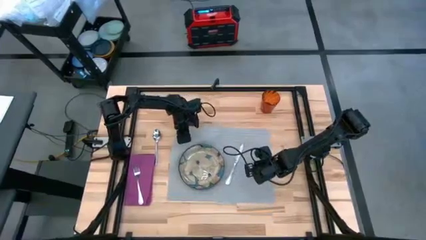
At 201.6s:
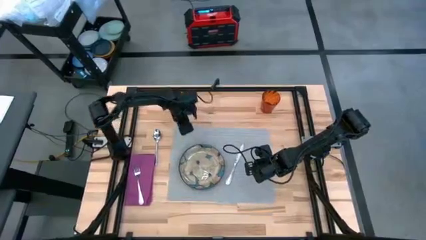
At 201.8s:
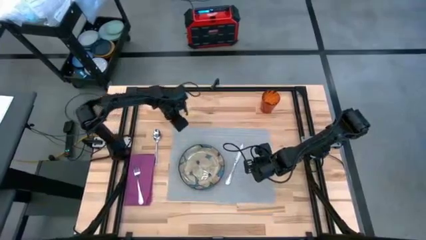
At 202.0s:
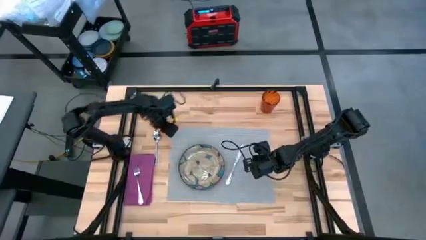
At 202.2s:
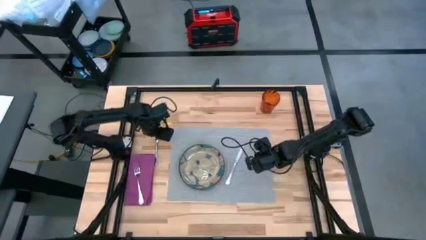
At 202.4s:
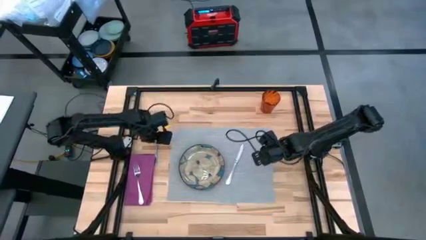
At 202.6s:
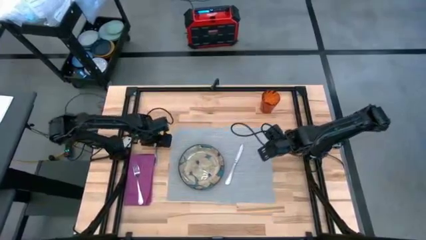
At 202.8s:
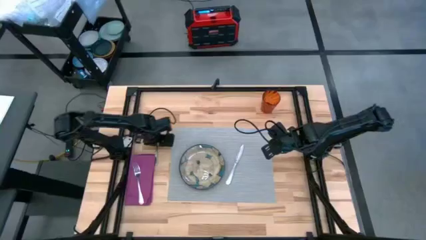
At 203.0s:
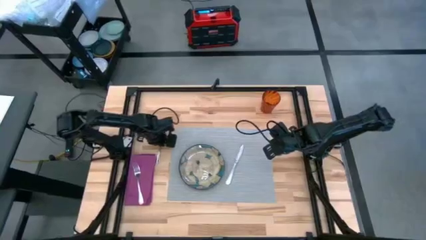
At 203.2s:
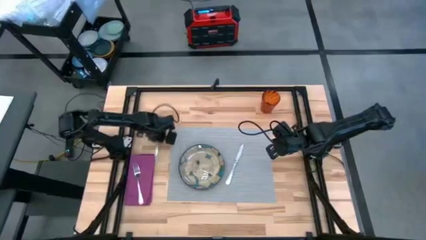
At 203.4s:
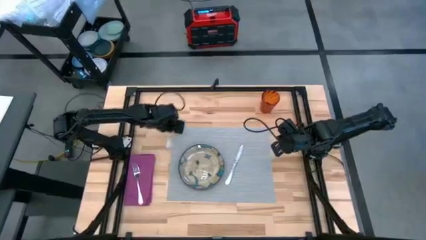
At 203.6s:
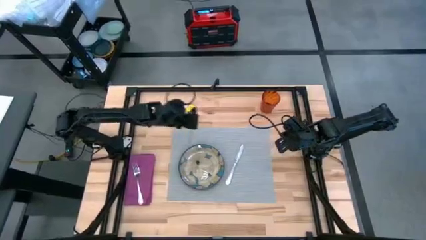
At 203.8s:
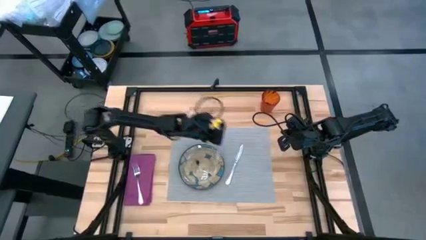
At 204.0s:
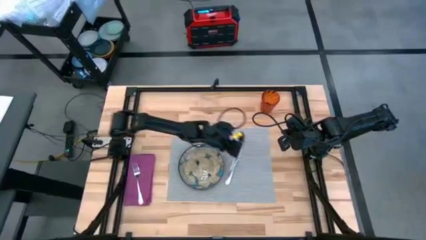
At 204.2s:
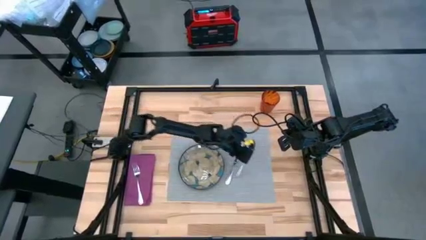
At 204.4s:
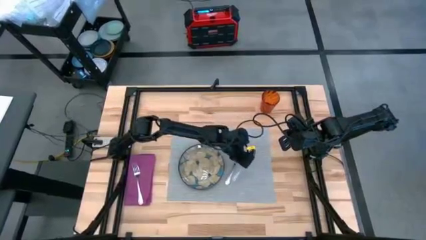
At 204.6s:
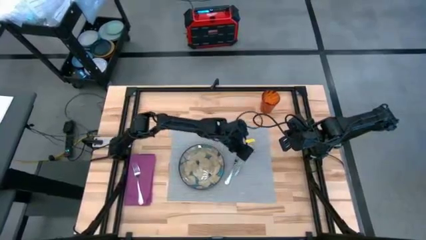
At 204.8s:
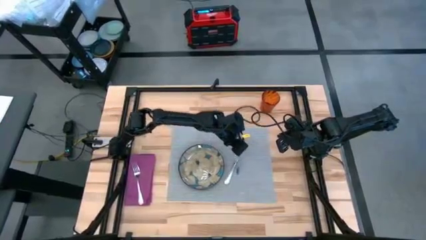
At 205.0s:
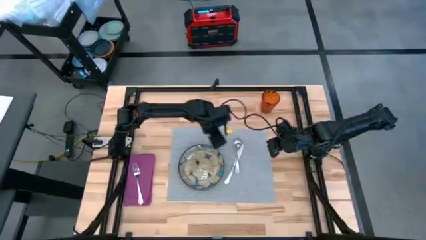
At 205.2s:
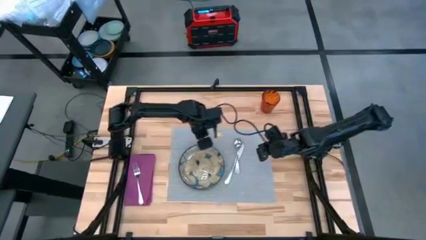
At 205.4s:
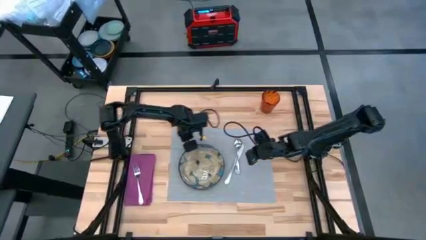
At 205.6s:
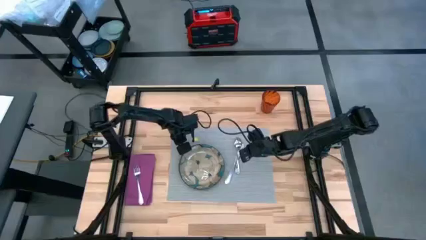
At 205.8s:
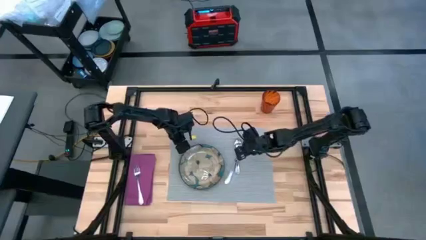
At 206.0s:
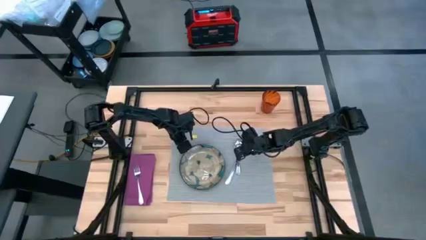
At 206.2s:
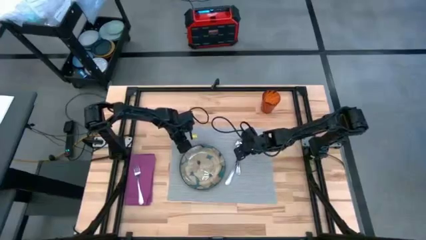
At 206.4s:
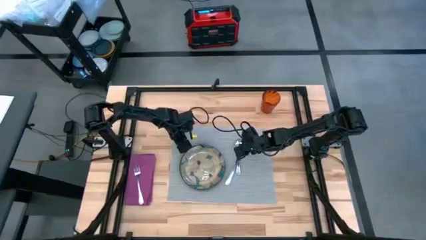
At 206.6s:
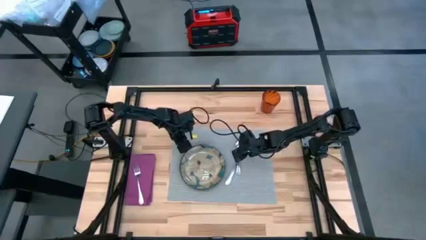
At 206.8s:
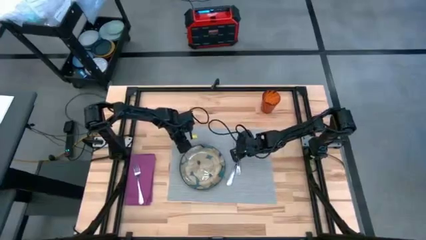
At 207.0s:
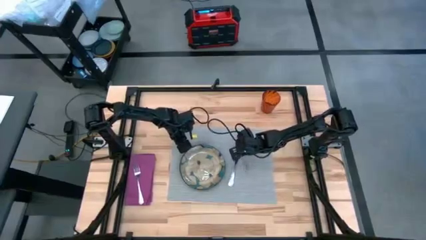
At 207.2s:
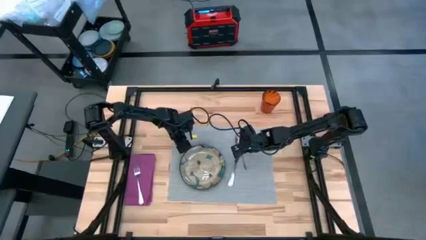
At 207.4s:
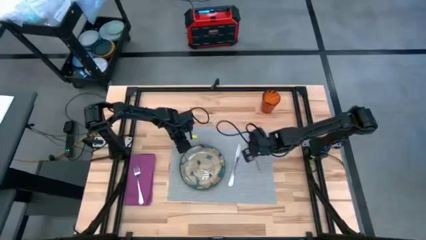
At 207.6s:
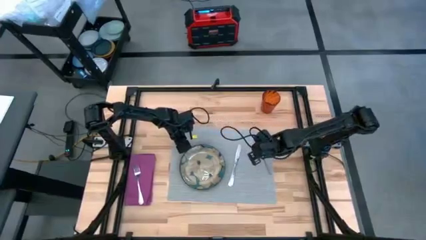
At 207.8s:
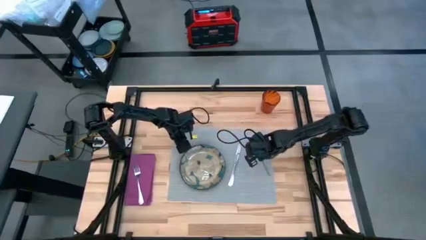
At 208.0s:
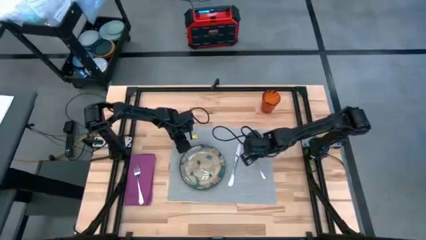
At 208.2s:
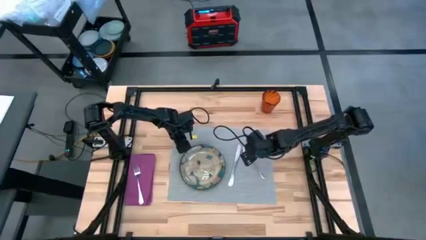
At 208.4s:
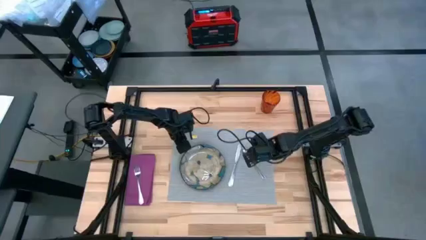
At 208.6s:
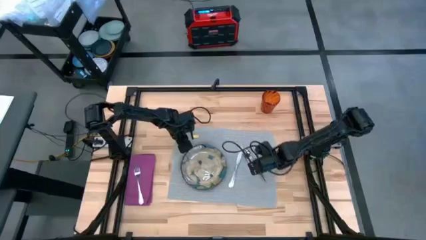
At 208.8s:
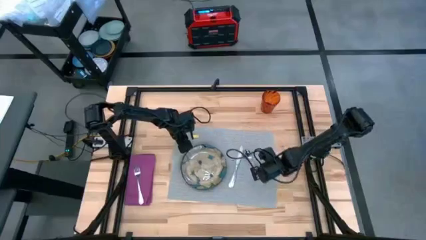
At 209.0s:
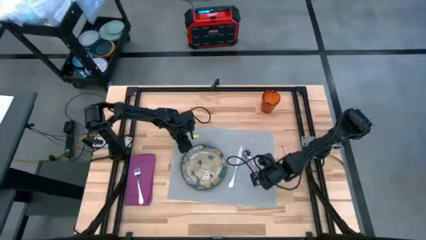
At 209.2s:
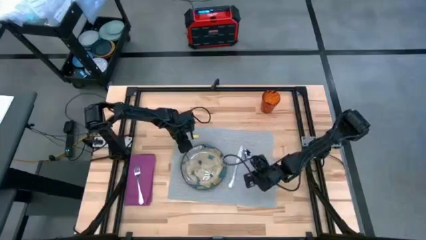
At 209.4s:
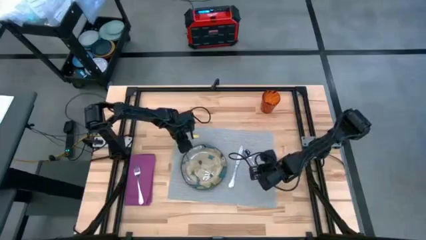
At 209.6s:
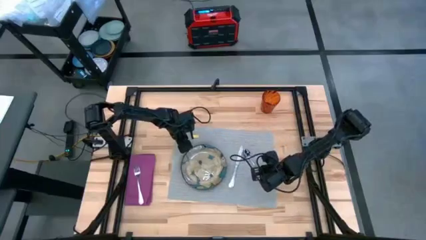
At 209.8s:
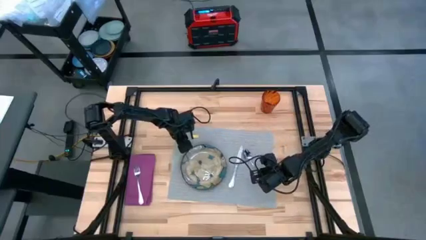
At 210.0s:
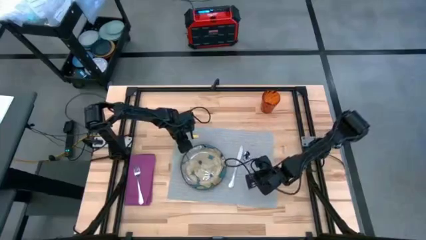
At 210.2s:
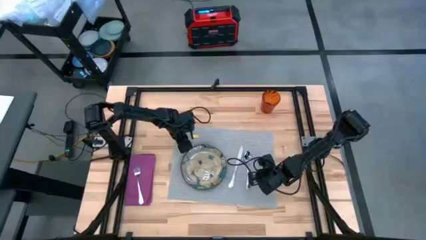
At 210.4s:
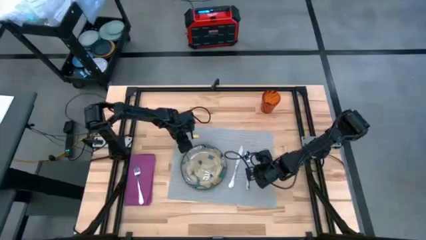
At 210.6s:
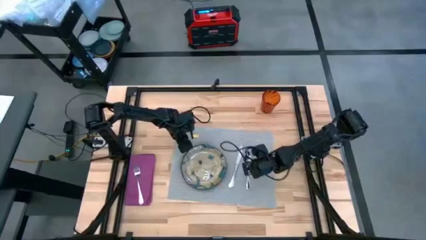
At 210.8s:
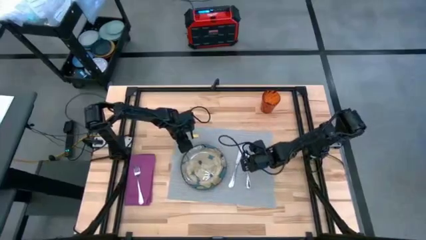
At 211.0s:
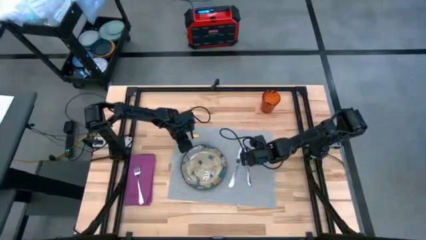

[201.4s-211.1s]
Task: Set table place
Put the silver spoon beside the silver knife on the gray placemat

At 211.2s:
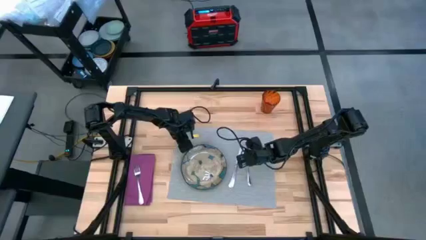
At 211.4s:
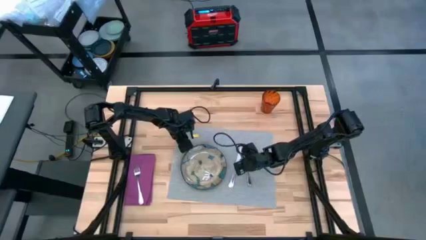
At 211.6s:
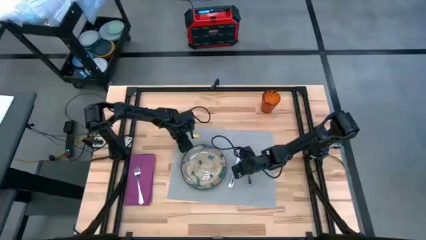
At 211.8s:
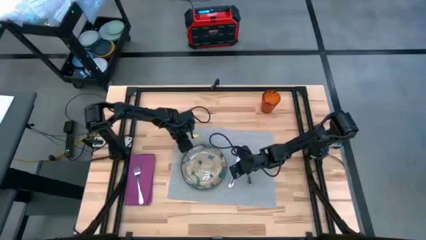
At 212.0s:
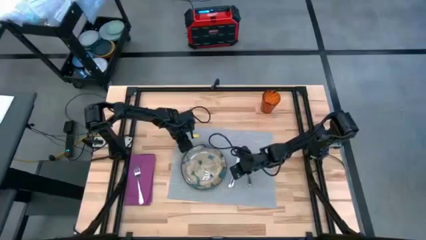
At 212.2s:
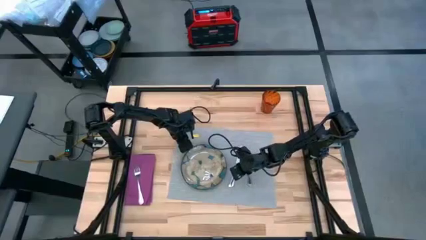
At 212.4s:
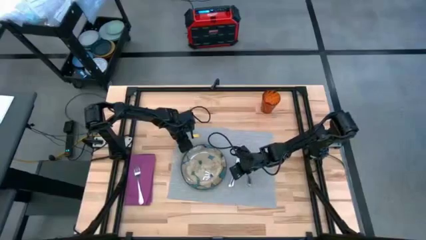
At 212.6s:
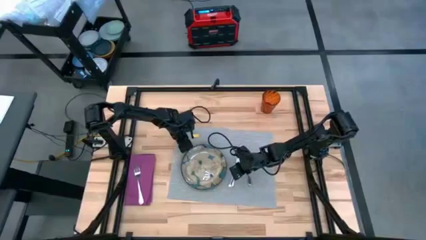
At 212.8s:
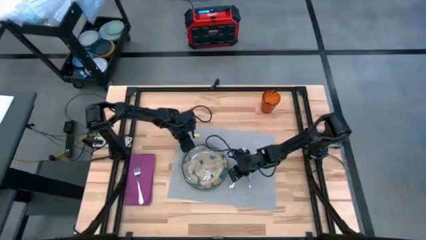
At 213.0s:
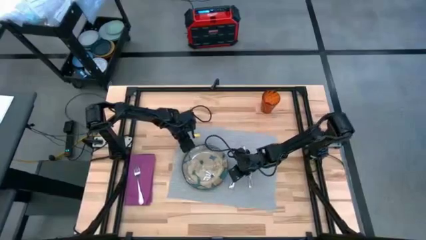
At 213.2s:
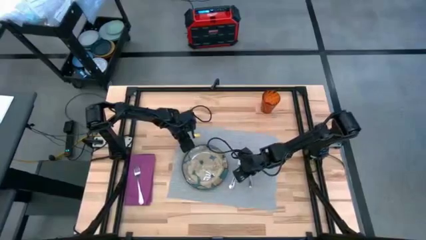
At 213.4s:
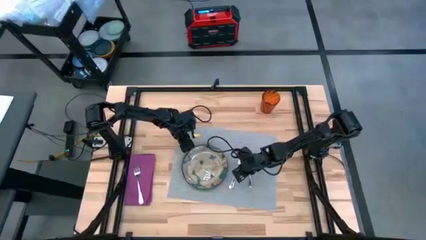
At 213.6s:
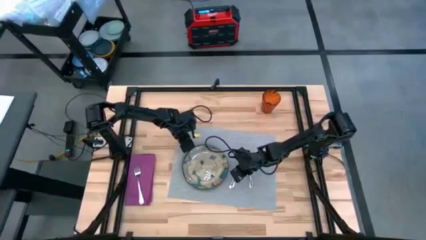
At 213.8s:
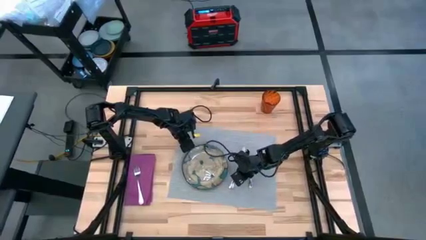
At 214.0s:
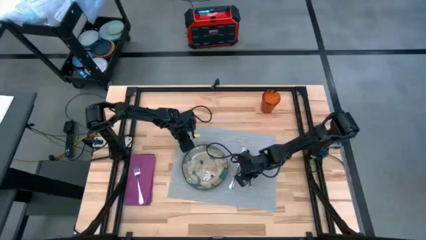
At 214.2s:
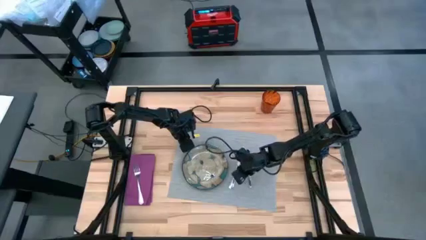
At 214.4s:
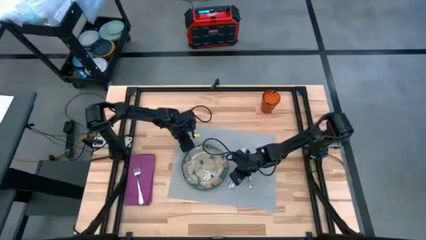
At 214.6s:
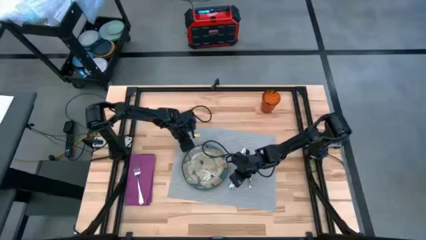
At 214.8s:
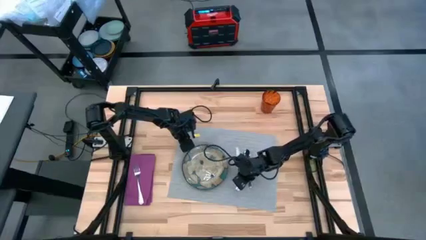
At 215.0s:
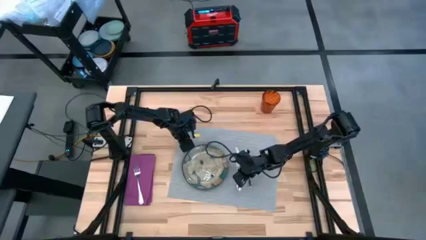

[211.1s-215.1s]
Adjust the silver knife on the gray placemat

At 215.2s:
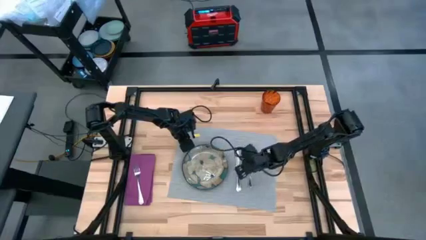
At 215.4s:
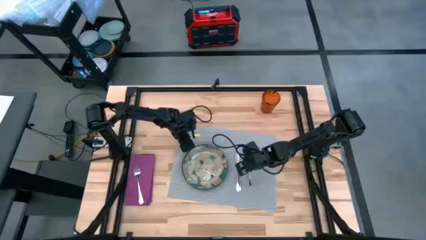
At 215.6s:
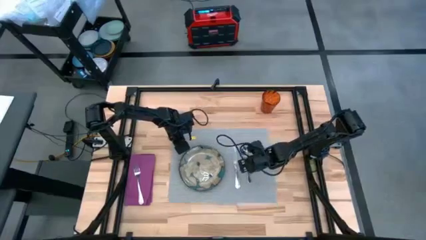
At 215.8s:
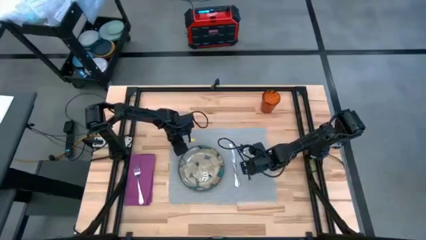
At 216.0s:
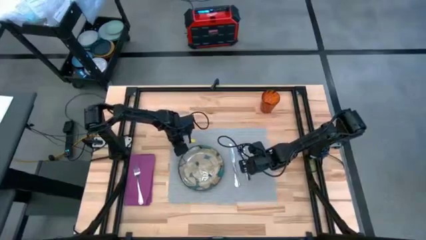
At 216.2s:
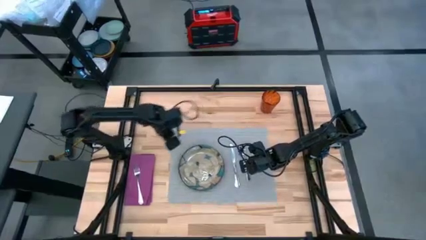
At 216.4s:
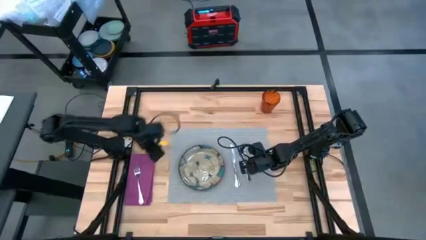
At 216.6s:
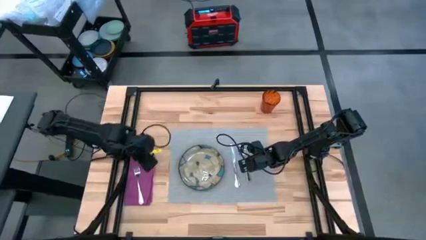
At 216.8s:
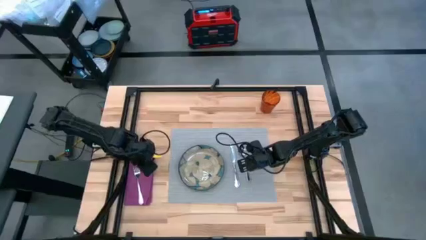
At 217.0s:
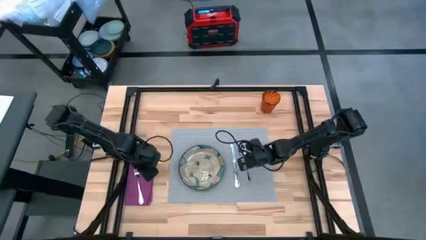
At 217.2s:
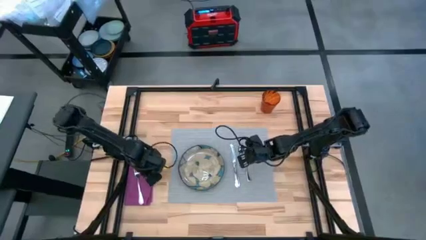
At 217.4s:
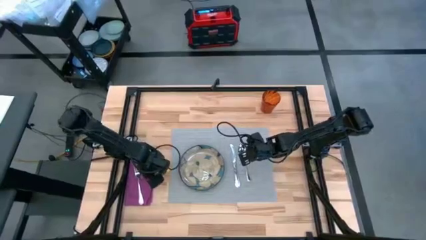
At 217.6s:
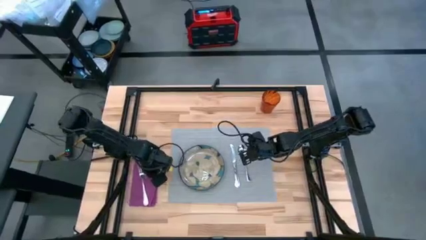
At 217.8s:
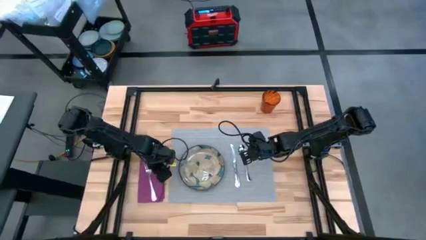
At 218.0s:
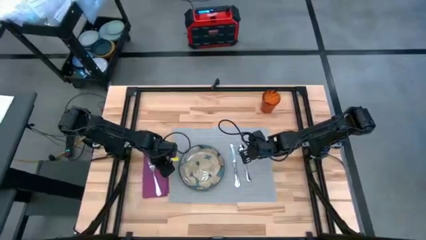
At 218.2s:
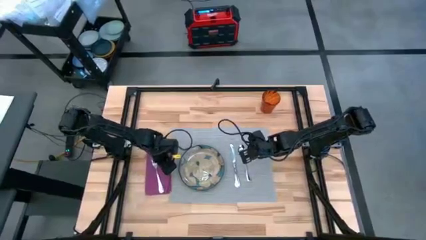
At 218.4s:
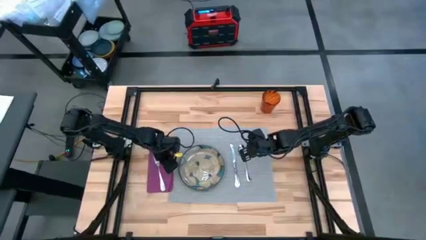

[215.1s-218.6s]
Move the purple napkin to the left of the gray placemat

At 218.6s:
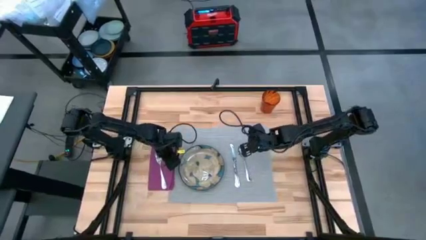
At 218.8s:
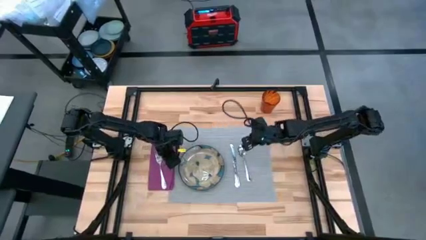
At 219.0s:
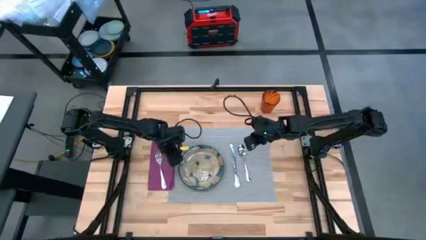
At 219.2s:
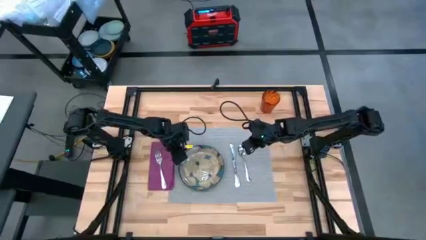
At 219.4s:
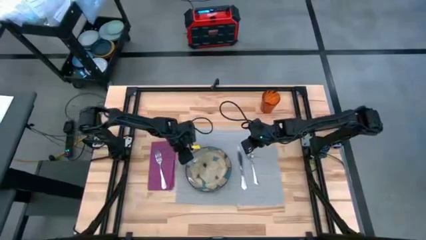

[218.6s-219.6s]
Adjust the gray placemat on the center table
